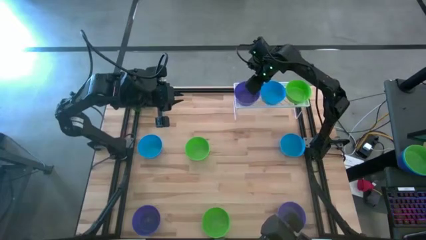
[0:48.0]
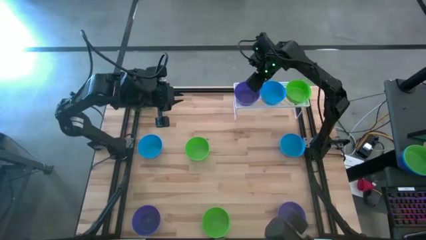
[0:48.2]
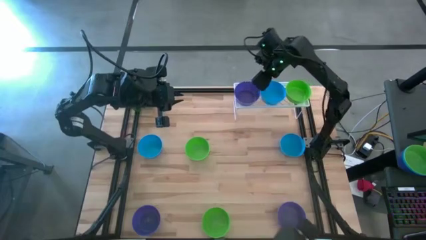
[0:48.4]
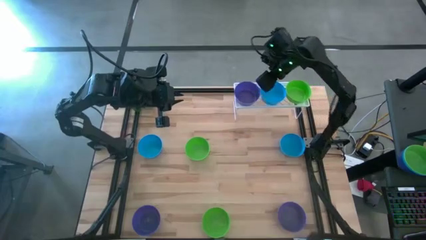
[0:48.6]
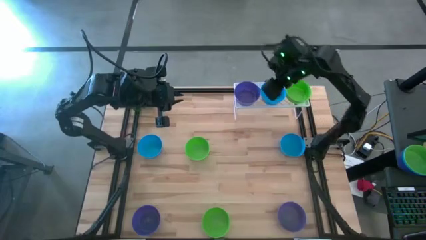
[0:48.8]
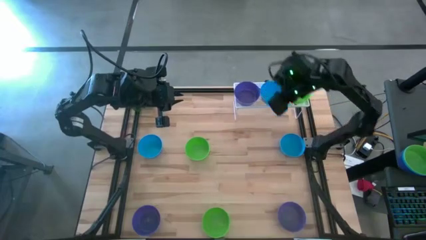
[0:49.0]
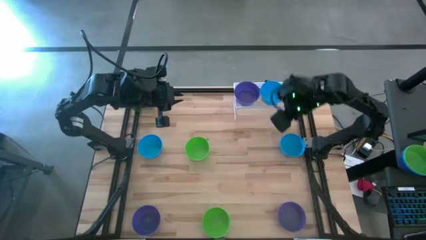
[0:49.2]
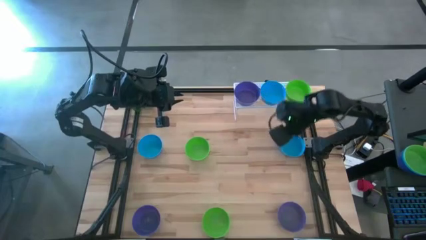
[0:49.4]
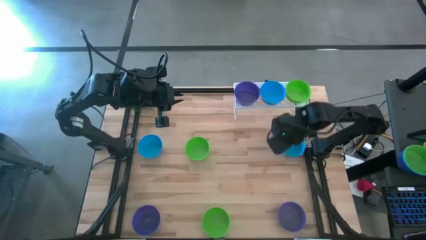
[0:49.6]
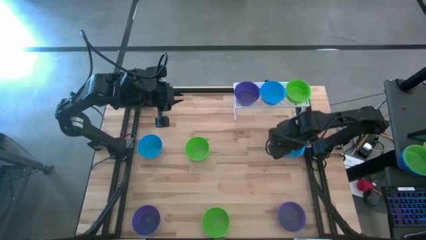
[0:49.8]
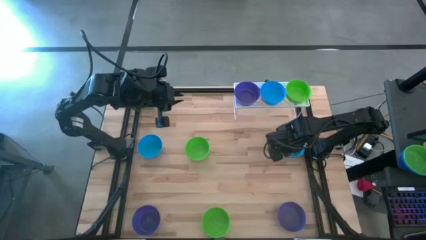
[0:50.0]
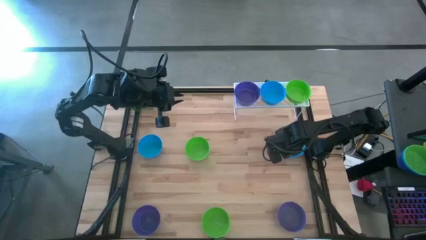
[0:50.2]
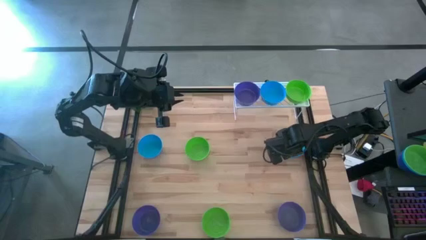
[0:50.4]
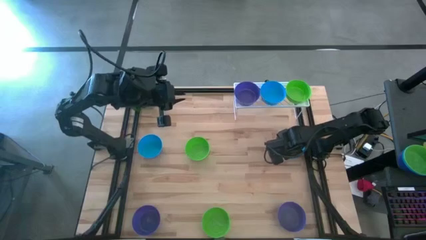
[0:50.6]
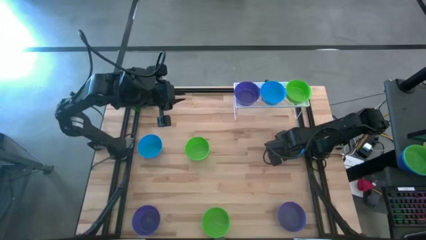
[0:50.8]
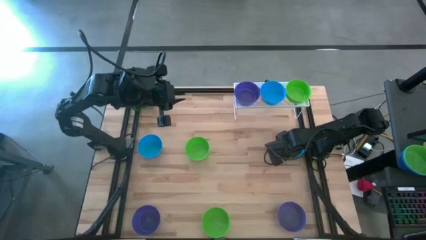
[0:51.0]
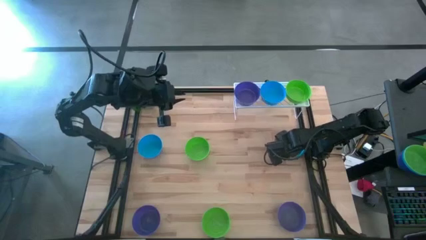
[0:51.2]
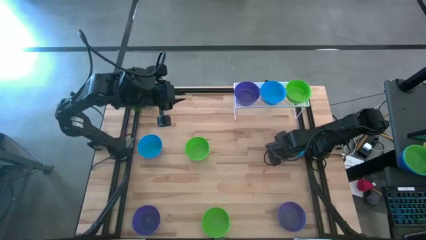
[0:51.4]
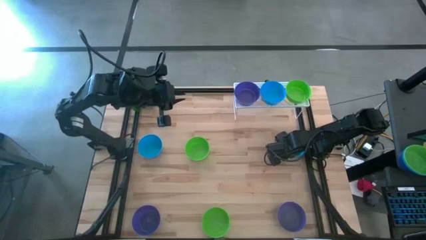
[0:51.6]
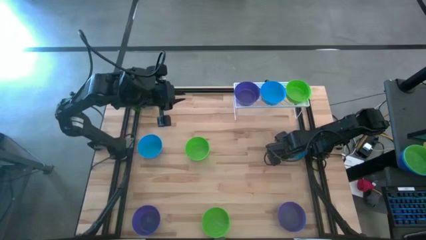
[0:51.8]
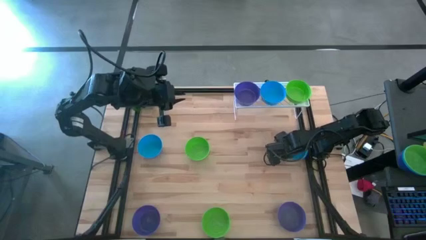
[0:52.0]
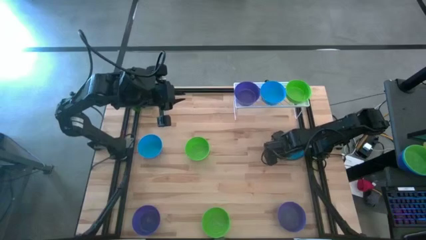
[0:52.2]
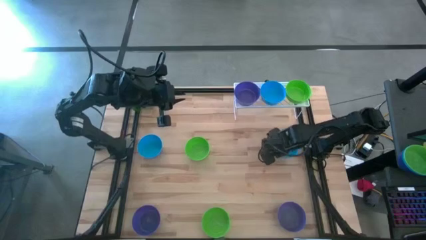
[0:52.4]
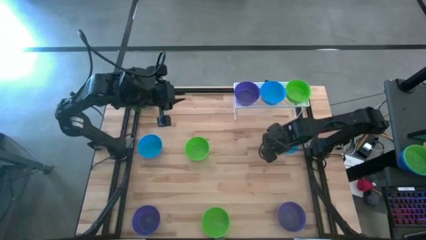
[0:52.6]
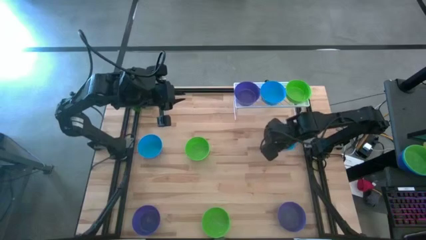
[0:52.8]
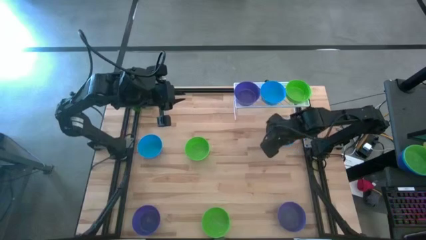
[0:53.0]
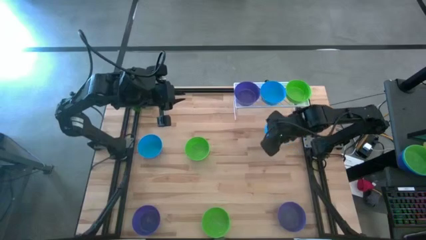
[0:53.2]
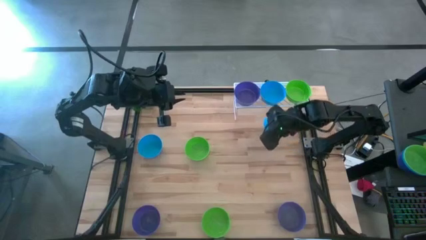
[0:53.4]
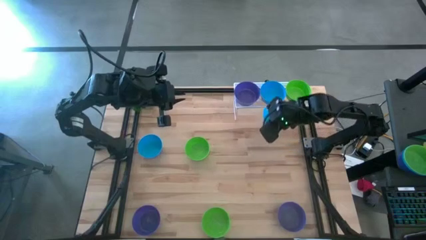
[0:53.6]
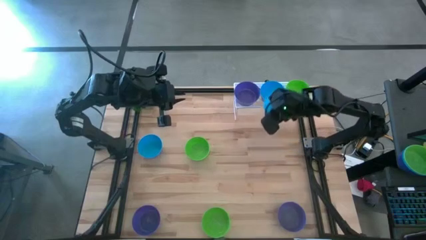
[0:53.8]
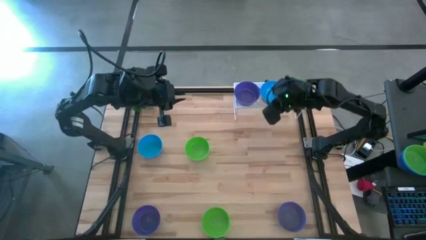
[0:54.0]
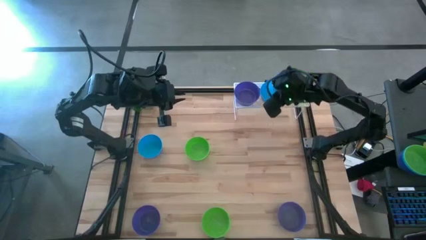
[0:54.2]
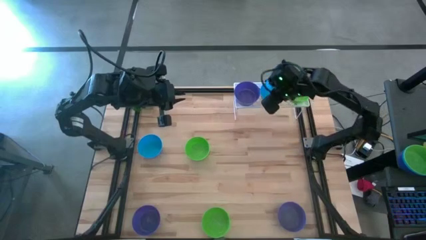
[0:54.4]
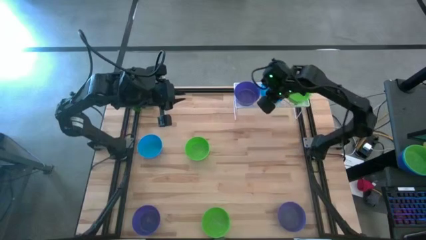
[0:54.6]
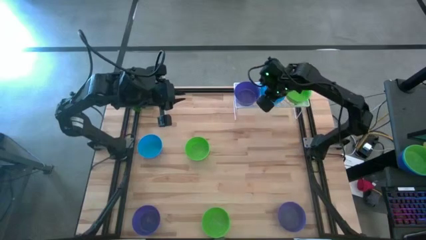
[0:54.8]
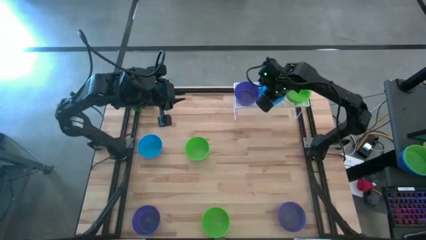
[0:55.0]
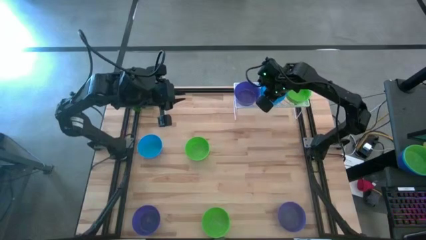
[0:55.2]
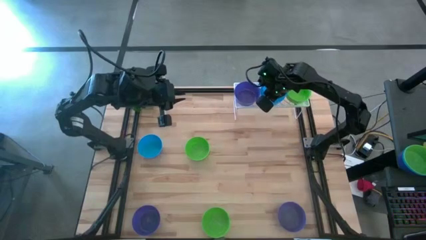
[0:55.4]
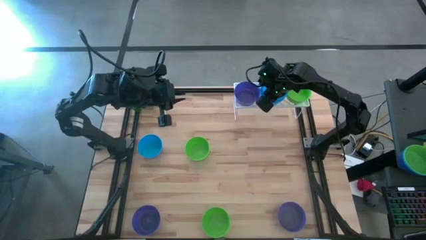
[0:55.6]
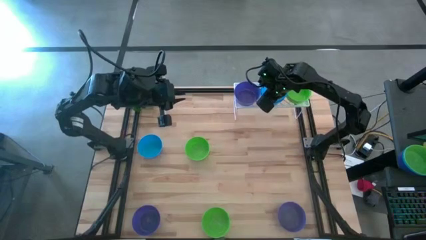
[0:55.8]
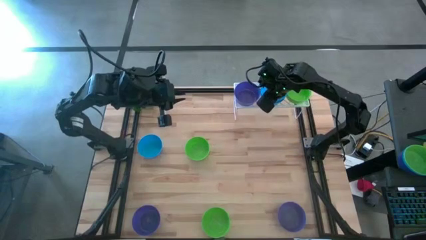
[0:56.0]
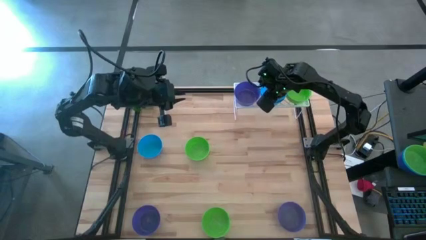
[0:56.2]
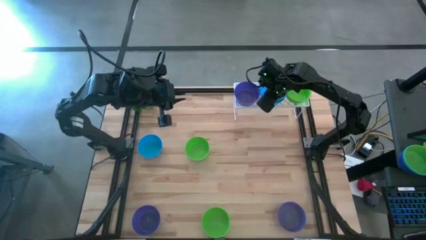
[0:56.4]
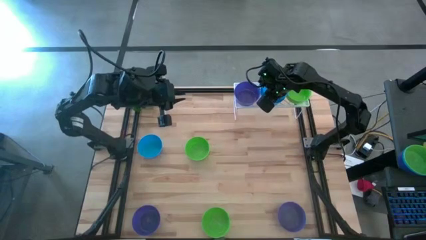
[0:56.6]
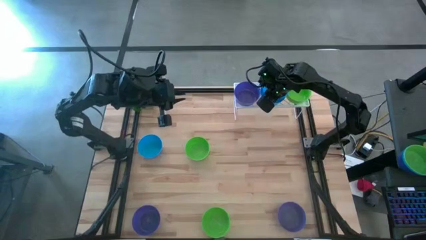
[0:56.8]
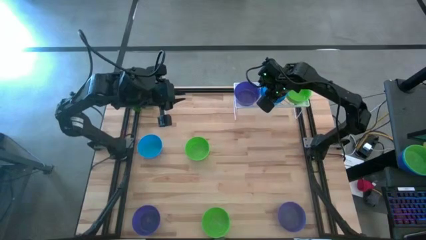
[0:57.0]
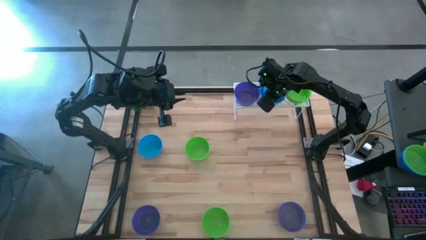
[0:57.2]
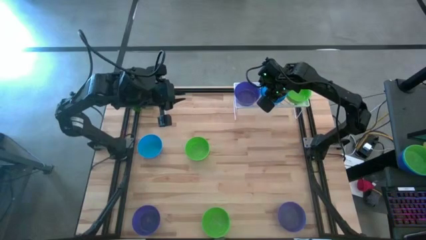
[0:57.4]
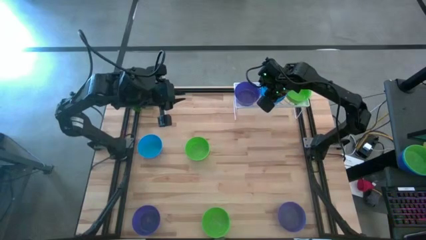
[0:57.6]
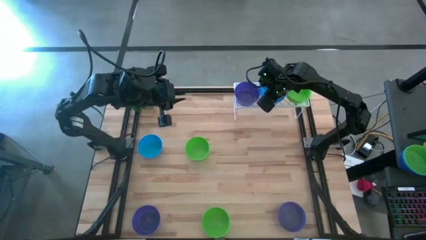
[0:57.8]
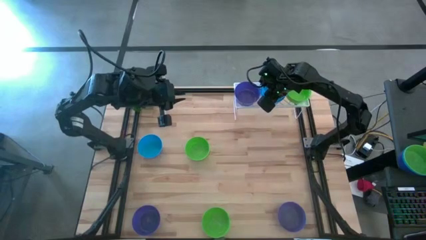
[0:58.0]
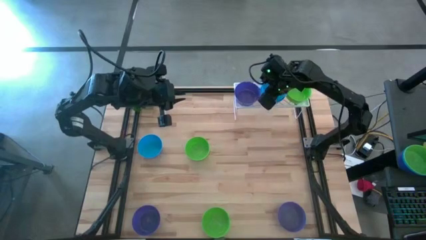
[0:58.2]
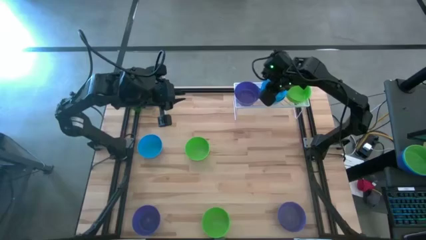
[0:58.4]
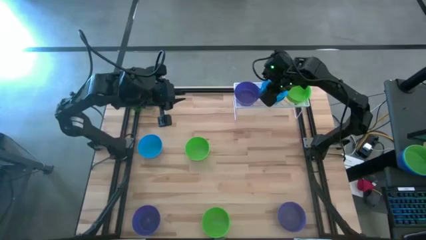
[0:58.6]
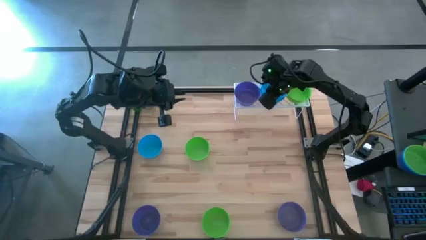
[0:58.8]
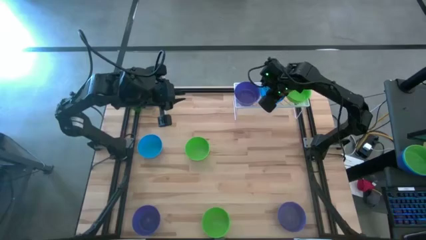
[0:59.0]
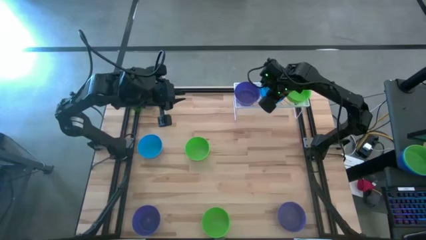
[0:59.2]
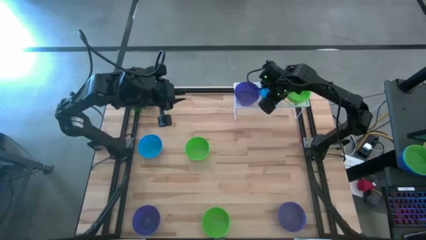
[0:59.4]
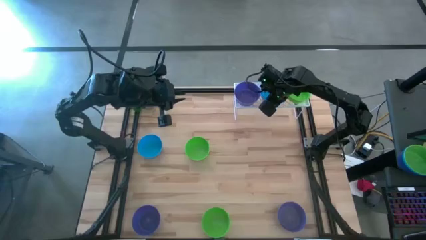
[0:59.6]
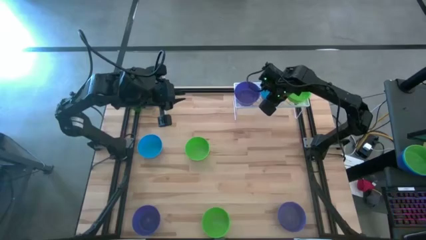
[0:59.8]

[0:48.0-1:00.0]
Task: Pick & Place Mini bowls
Stack the right blue bowl on top of the blue bowl on the shelf
